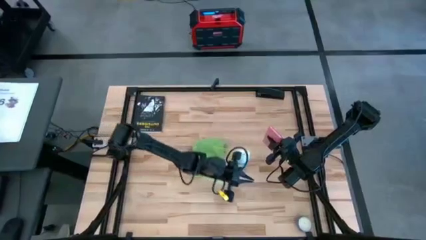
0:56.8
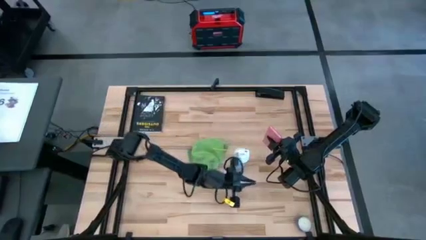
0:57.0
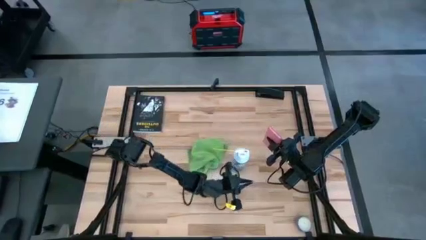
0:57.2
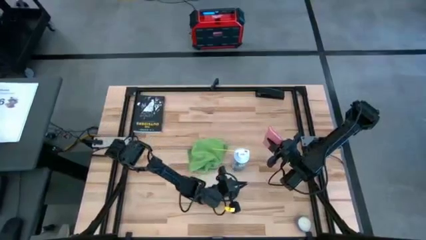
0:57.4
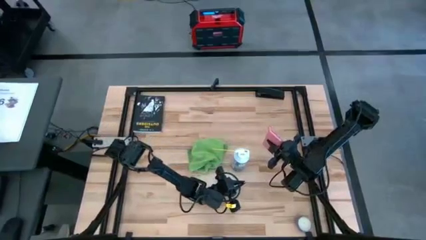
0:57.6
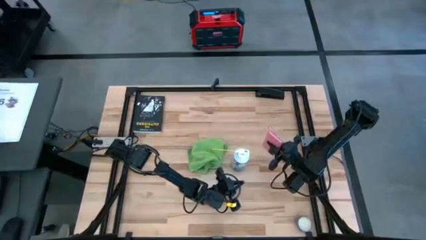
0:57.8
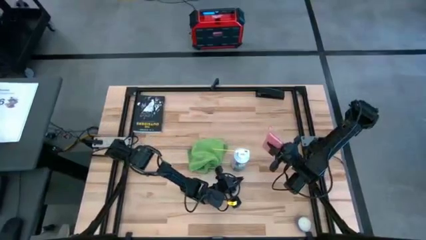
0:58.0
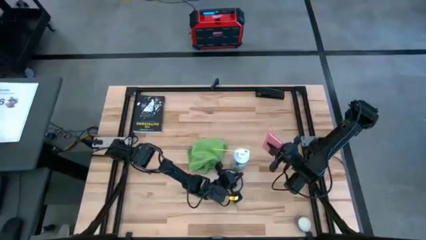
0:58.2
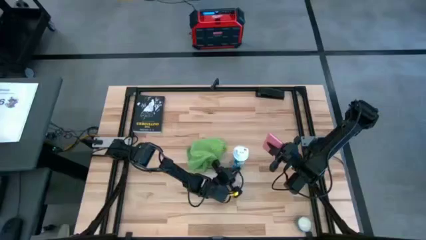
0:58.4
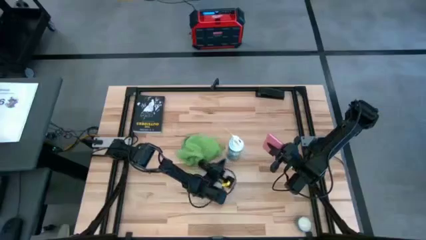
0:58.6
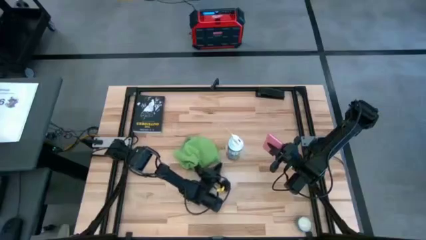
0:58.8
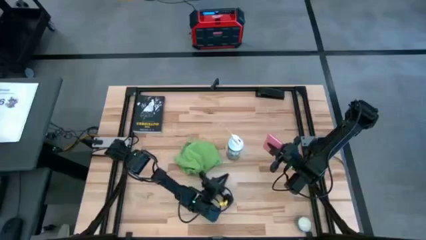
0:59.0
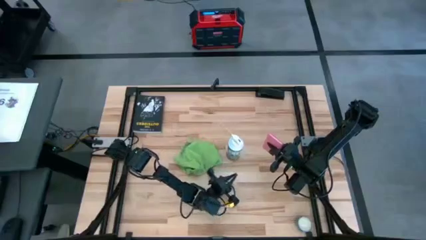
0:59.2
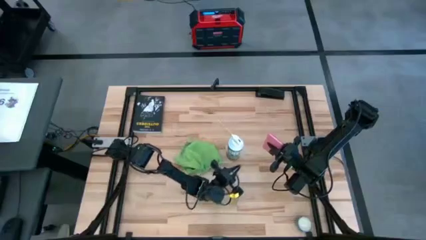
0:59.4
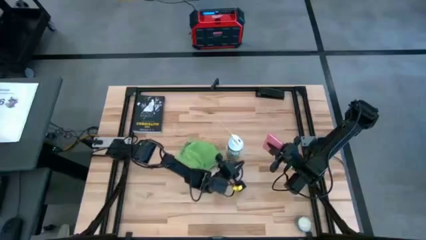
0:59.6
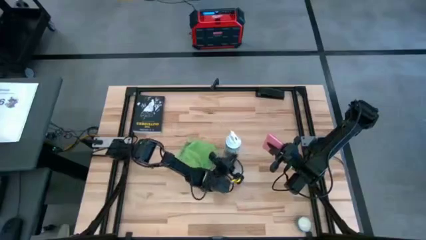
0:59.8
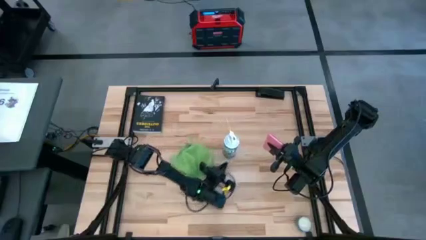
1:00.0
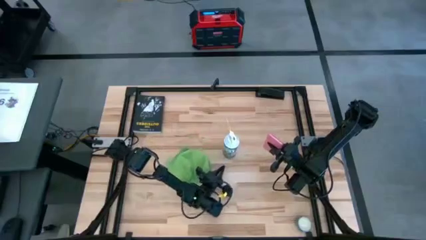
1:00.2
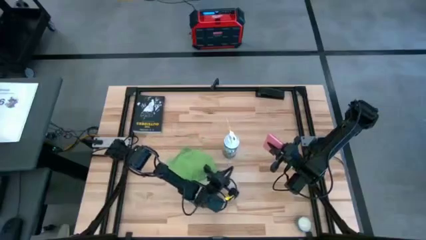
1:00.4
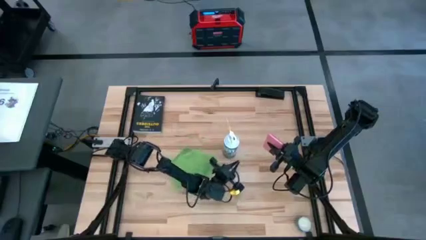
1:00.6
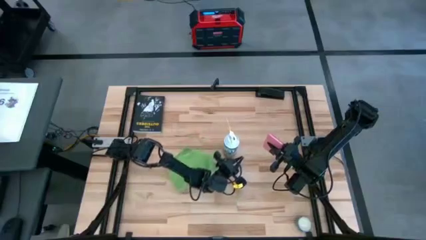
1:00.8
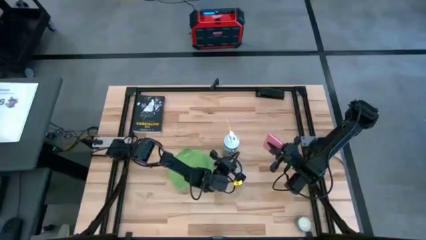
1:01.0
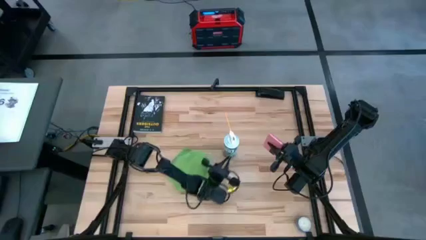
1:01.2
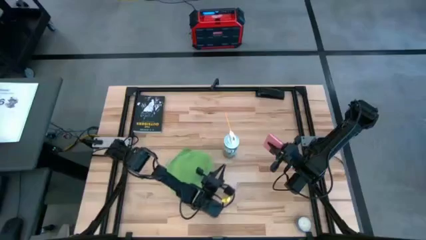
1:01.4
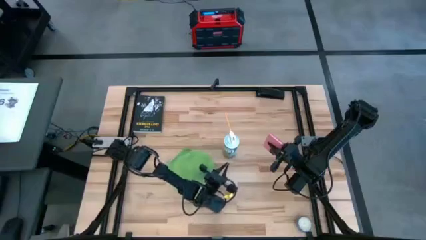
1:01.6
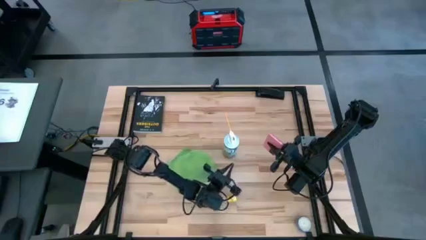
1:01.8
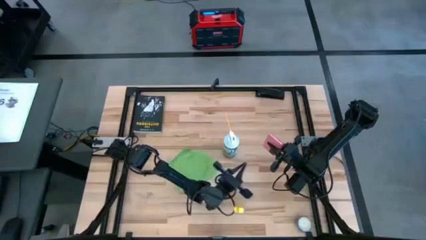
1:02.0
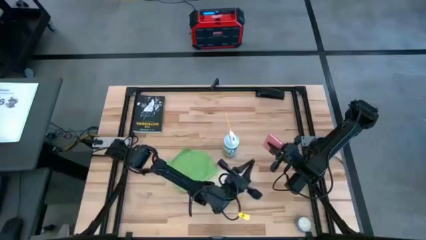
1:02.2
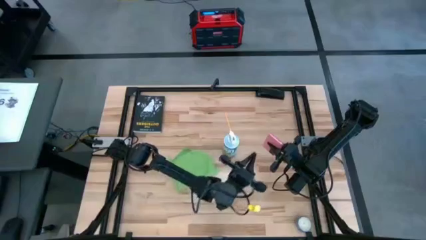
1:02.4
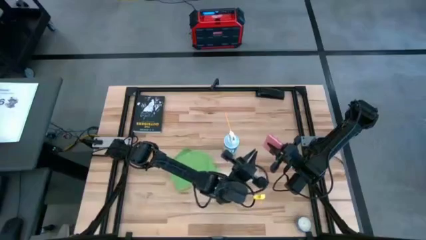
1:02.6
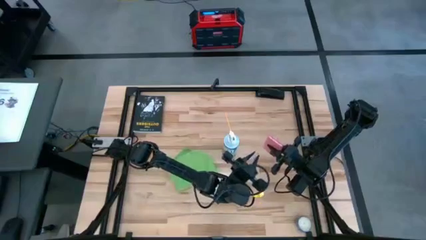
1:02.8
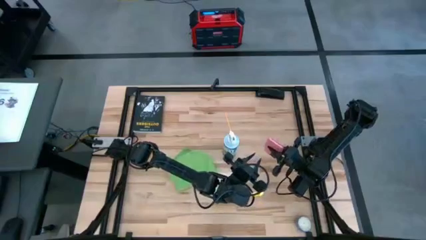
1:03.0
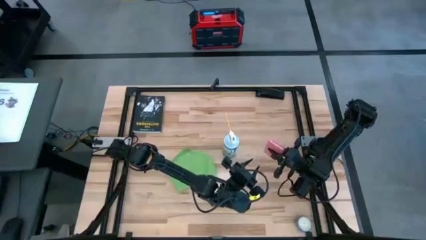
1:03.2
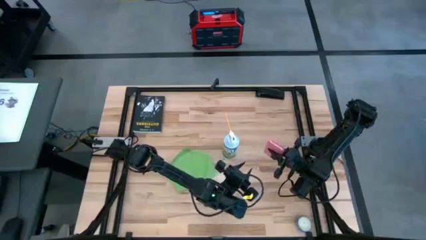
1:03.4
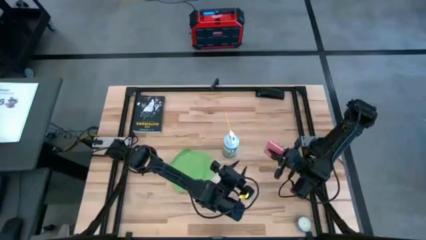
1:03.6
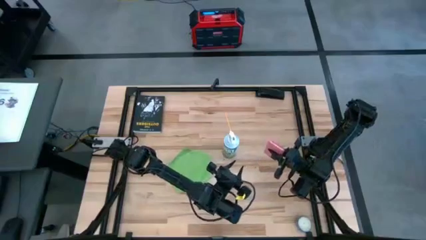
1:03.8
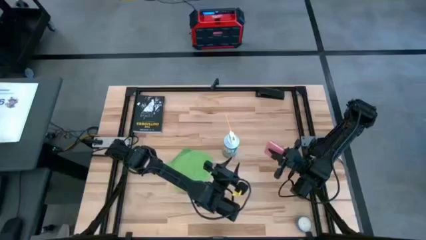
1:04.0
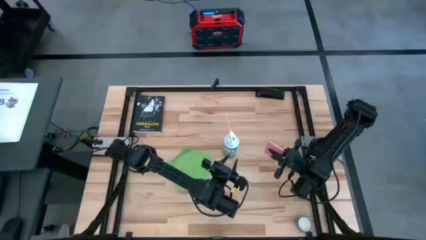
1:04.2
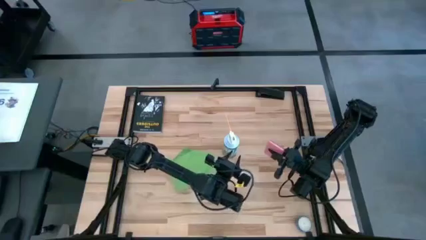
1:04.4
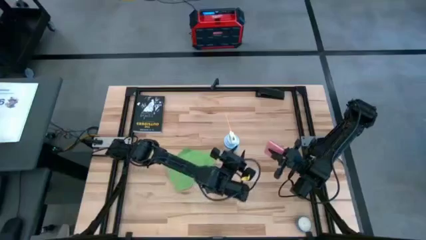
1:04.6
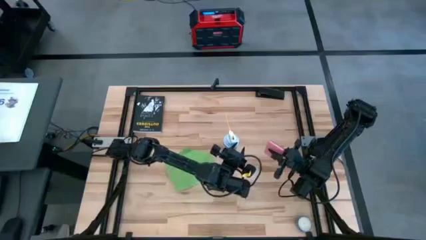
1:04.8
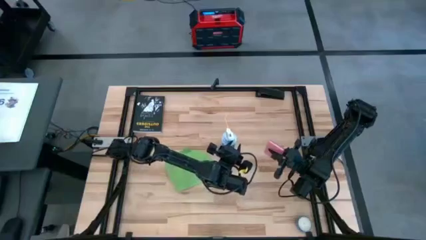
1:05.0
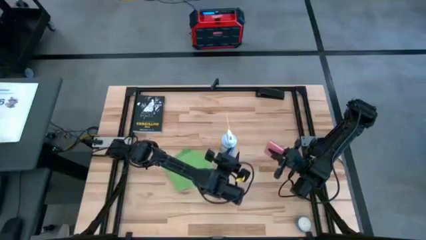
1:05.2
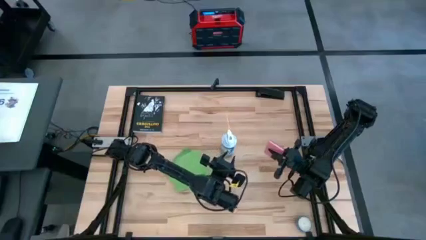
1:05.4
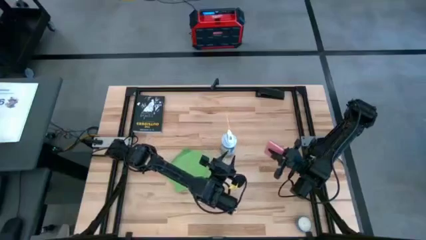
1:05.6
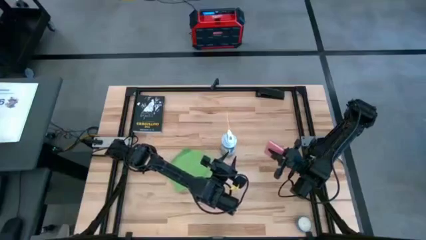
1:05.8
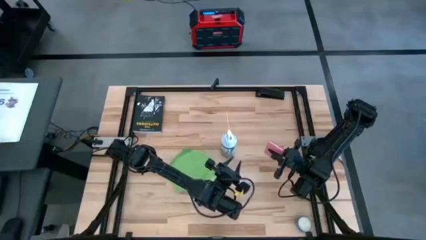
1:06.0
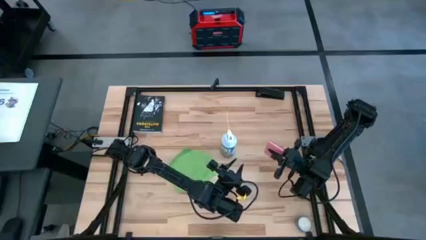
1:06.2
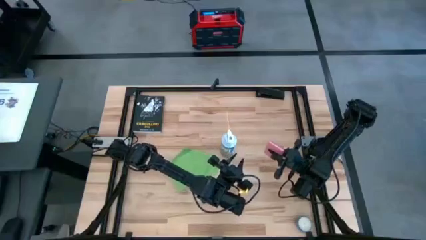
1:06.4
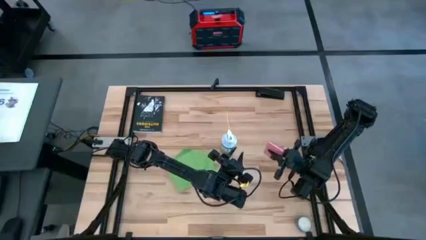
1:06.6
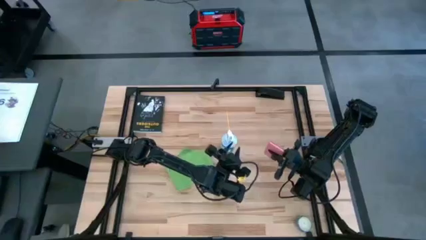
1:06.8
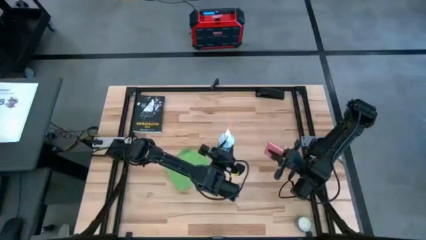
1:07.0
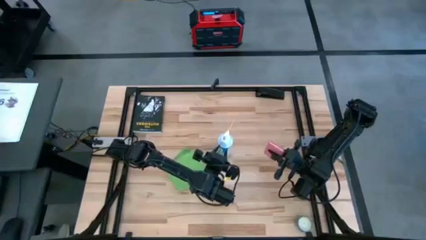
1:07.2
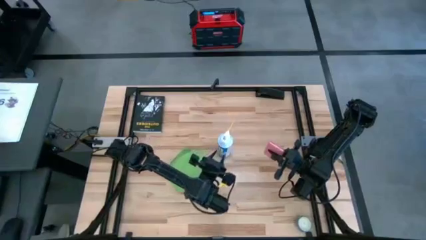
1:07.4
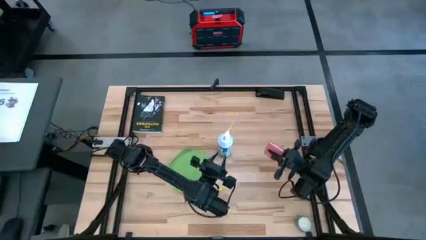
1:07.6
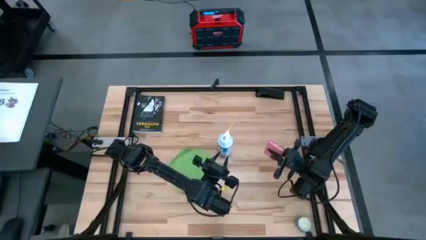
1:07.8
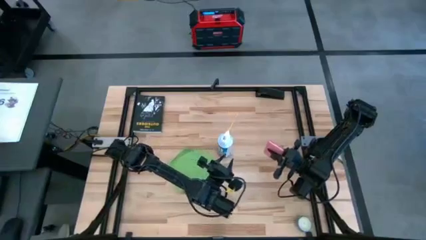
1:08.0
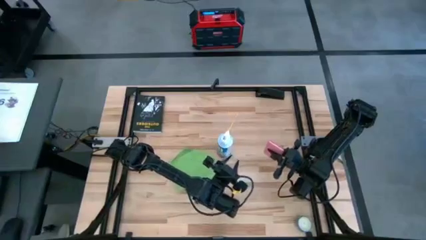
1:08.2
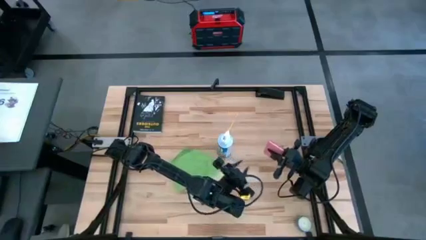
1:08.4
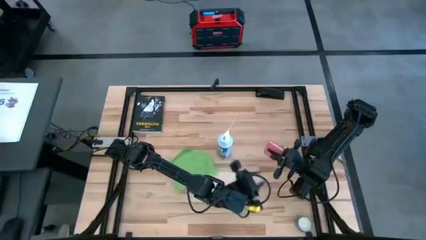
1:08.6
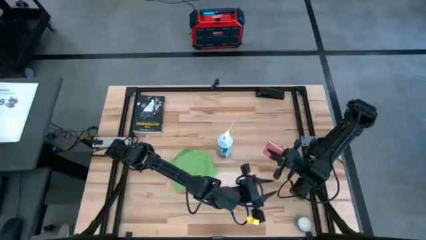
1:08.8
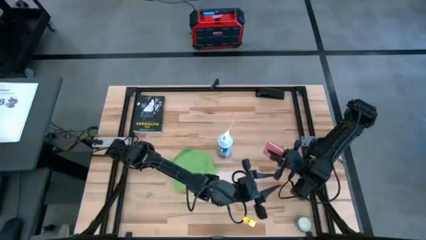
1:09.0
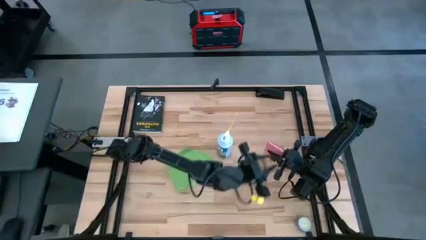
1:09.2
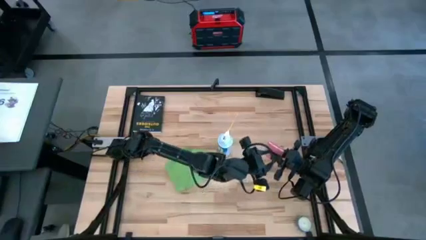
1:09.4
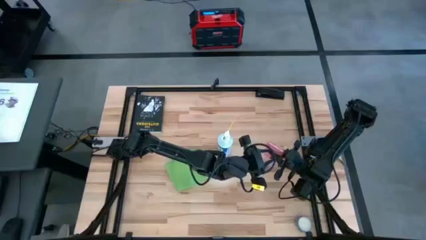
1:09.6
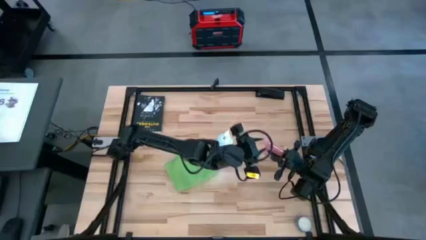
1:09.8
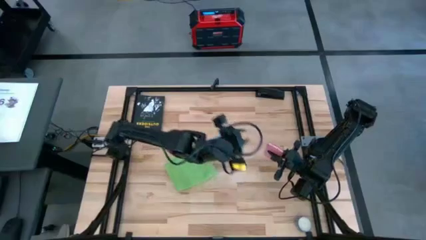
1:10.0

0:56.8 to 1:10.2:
Task: Apply microfiber cloth
Spray the pink cellphone using the spray bottle

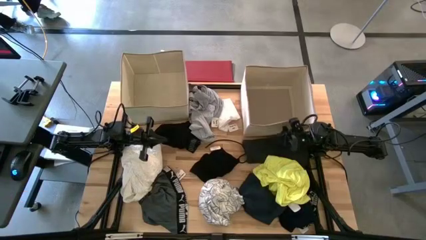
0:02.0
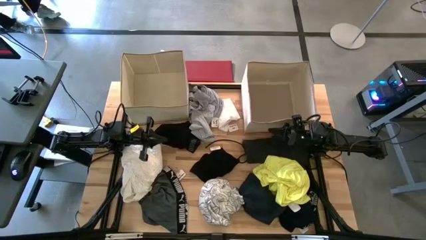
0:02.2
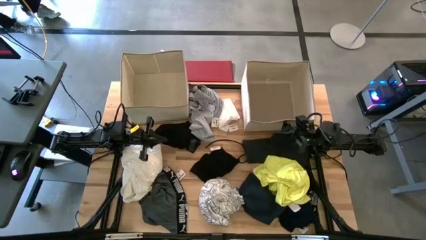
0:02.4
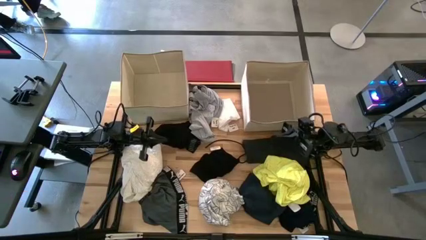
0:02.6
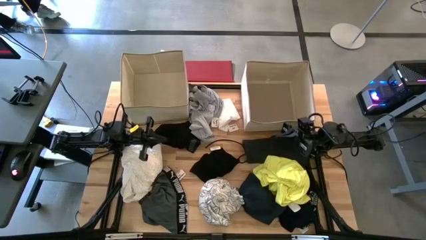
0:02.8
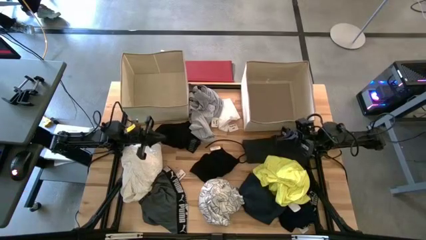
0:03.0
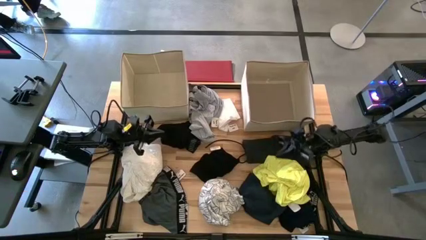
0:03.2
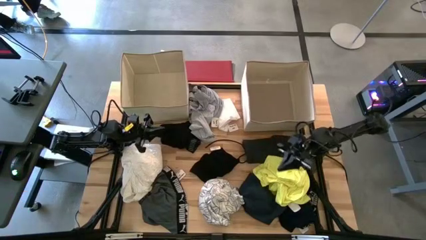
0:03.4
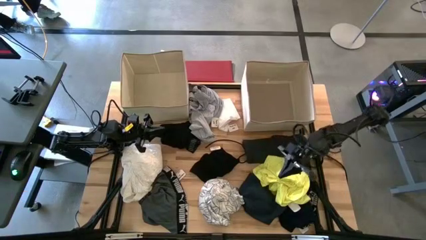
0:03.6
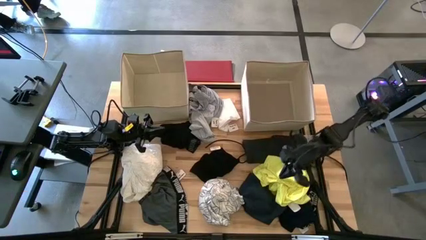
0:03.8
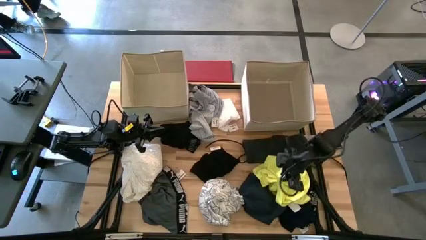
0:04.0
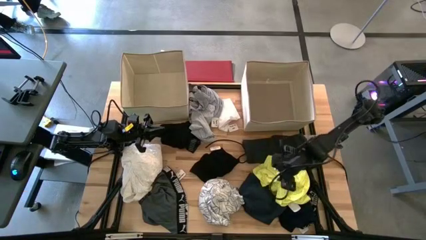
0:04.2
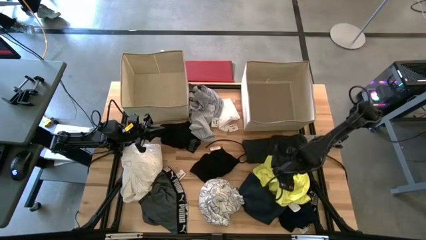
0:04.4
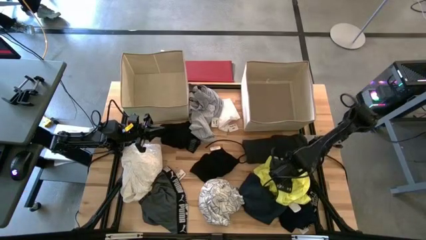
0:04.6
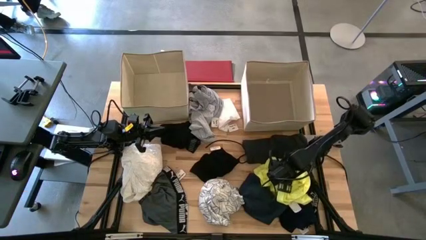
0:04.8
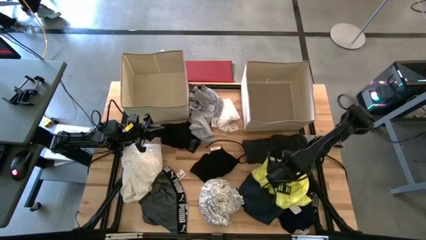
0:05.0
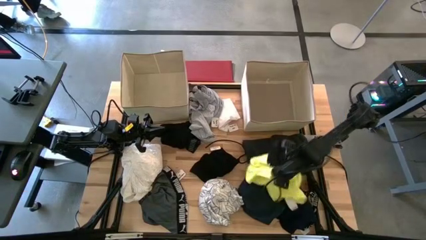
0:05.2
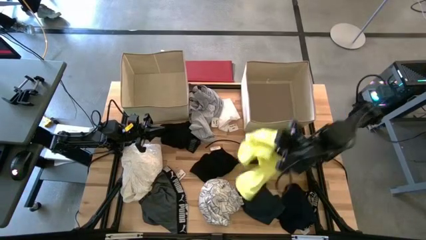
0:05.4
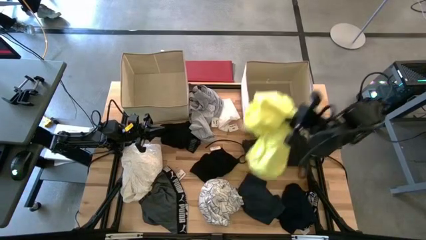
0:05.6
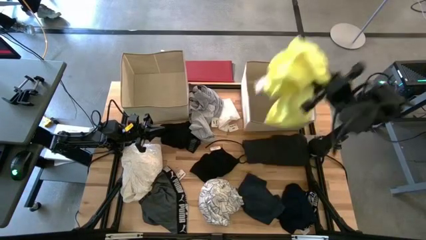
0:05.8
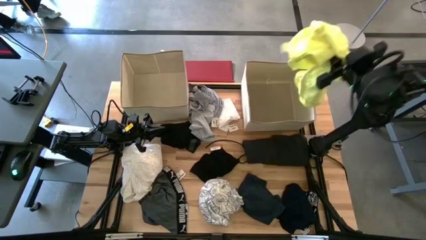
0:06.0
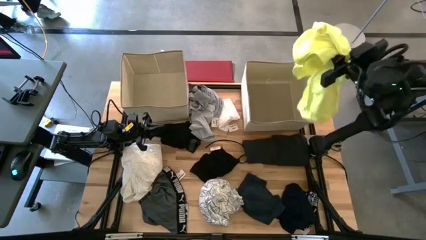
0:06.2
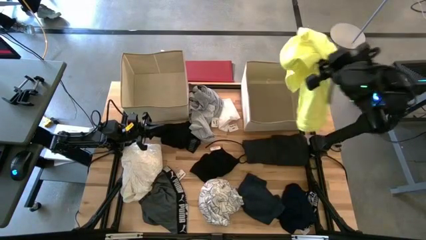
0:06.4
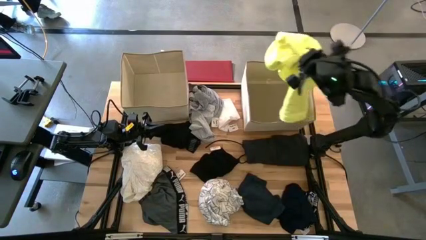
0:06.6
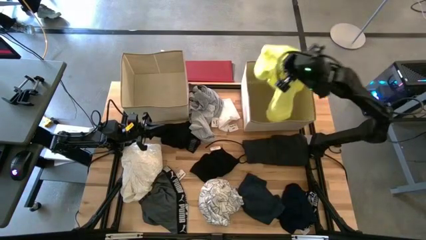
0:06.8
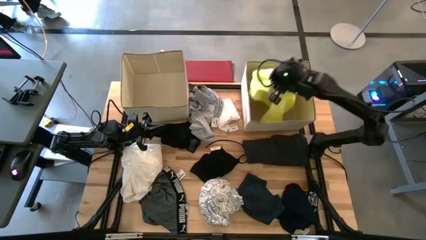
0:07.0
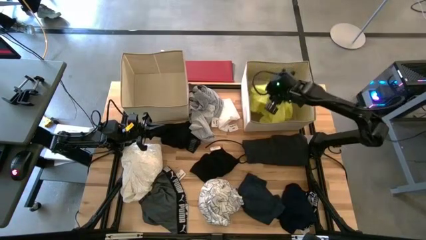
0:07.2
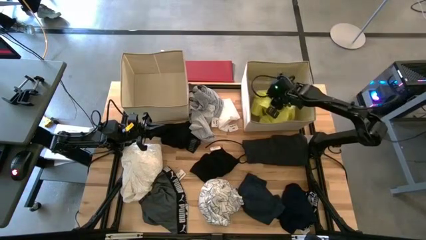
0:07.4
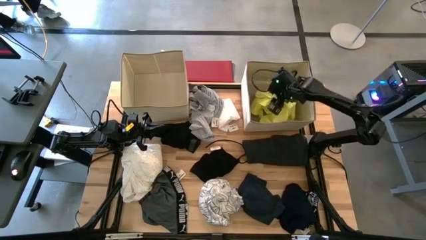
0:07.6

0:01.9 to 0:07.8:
Task: Sort clothes
Put the yellow shirt into the right laundry organizer
